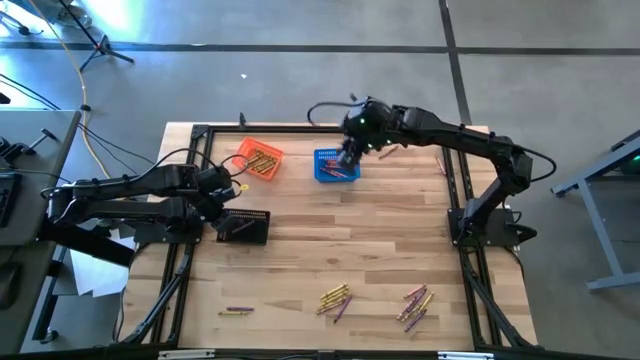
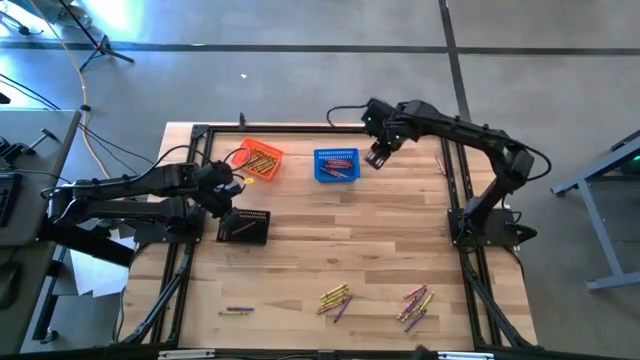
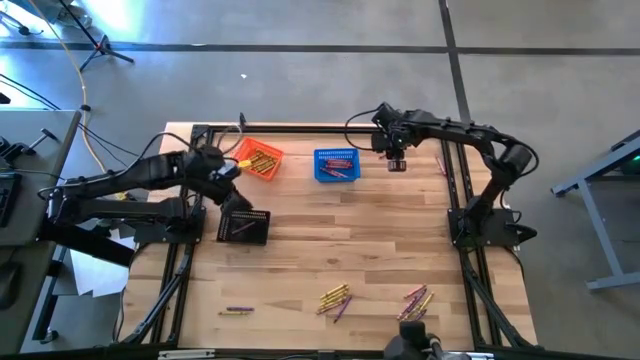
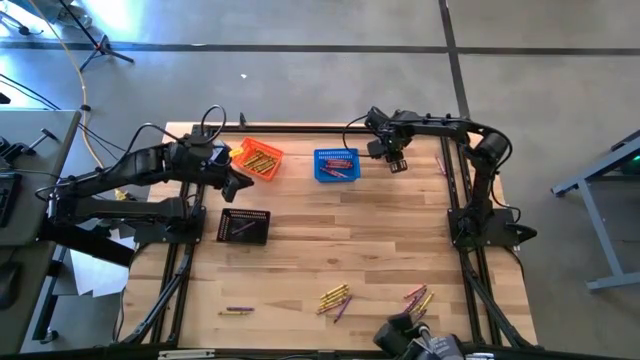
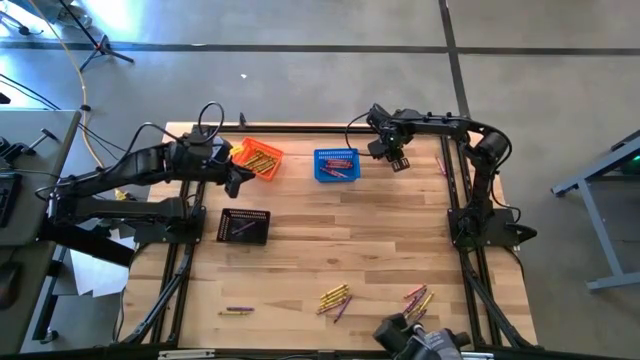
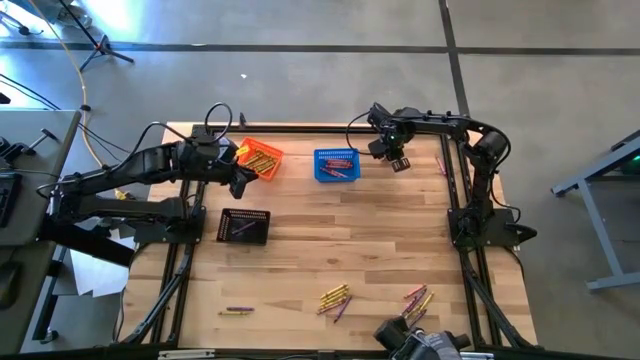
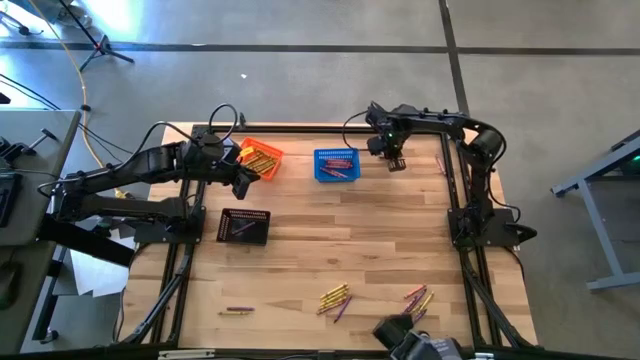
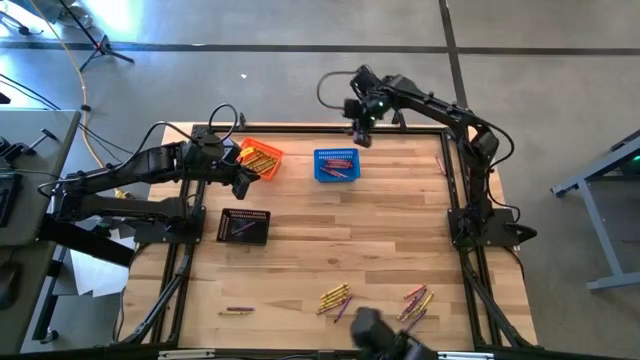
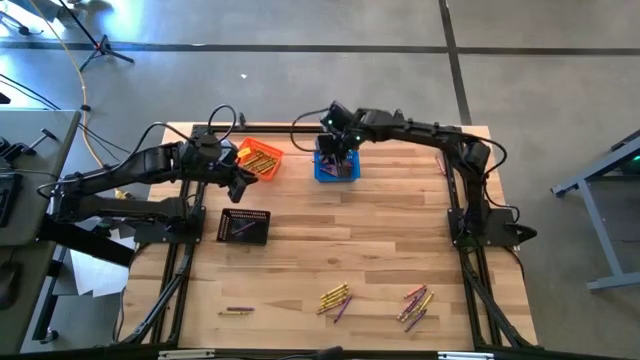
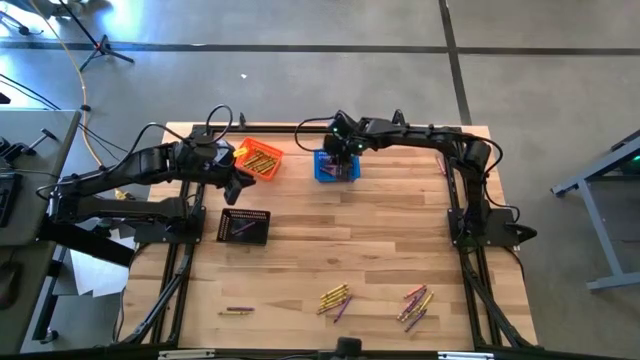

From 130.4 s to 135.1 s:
Task: Sort crayons
Put the red crayon into the blue bin

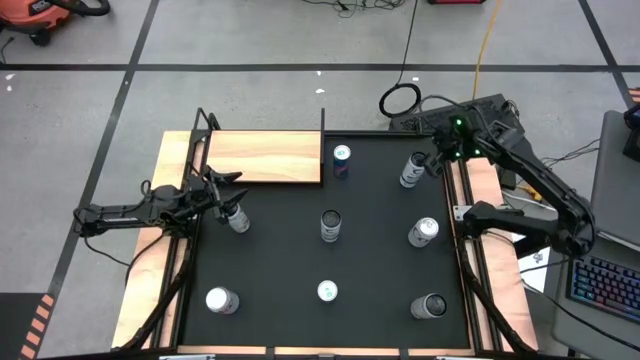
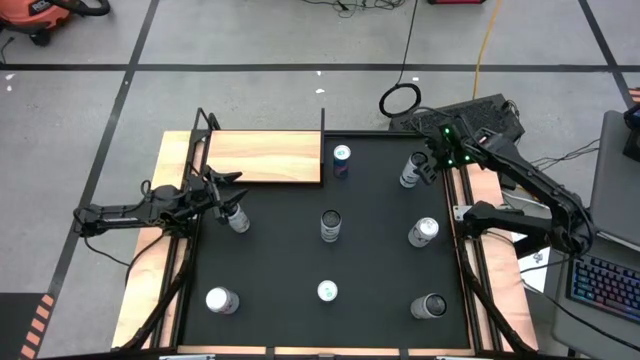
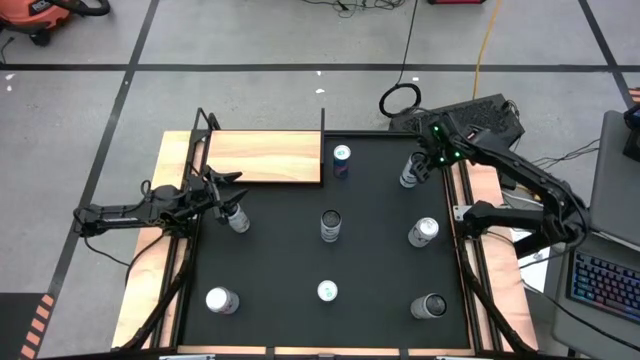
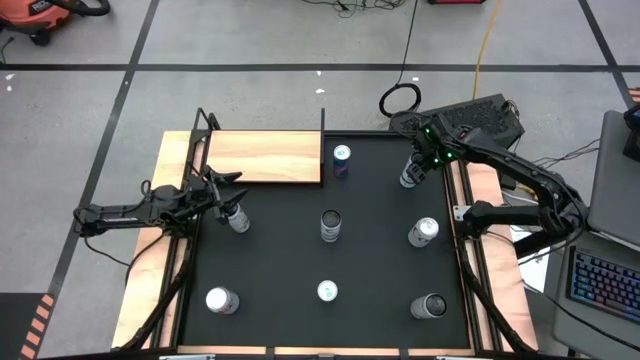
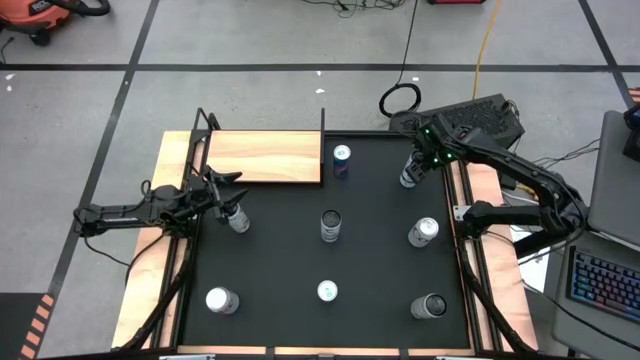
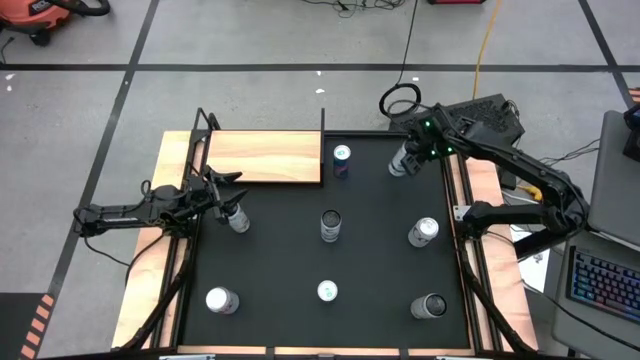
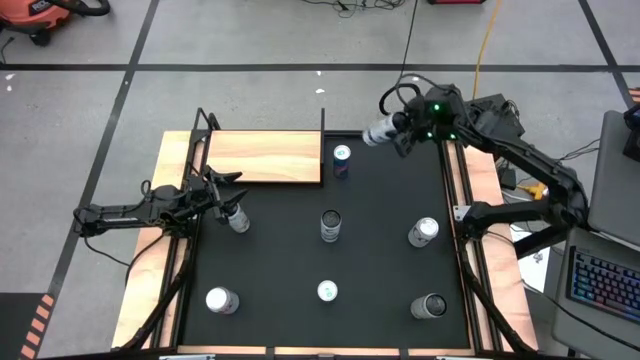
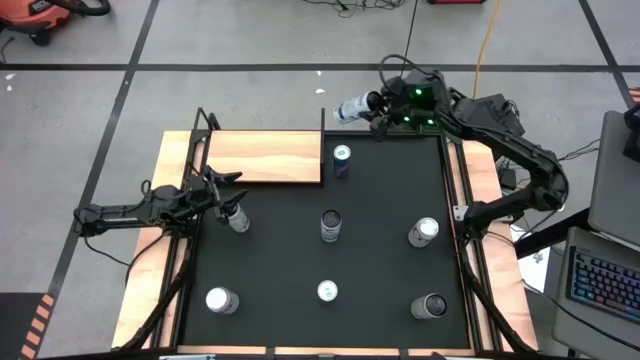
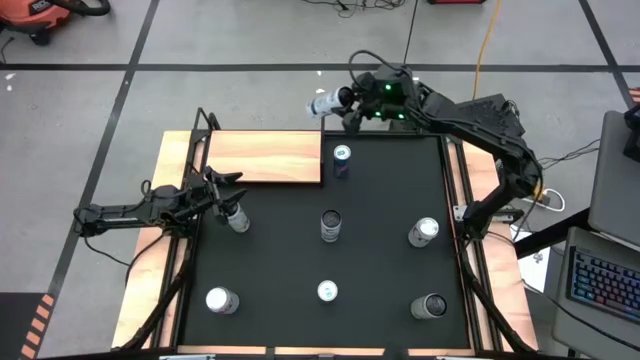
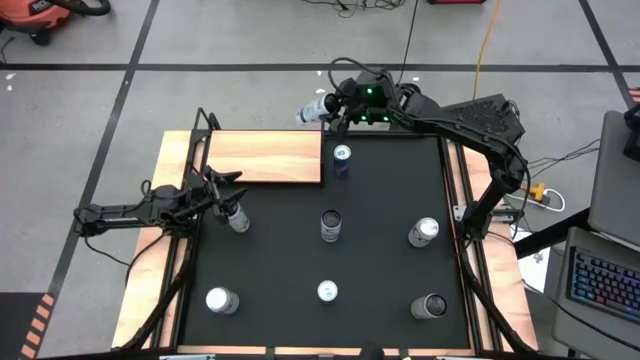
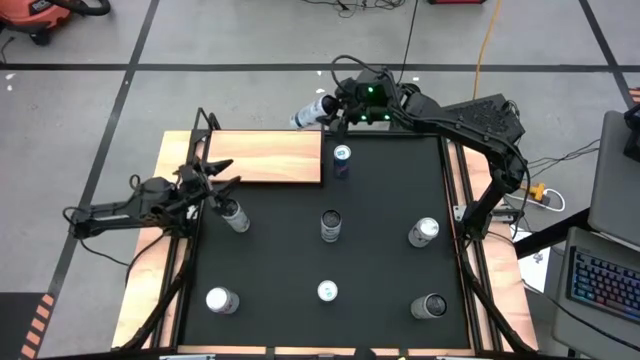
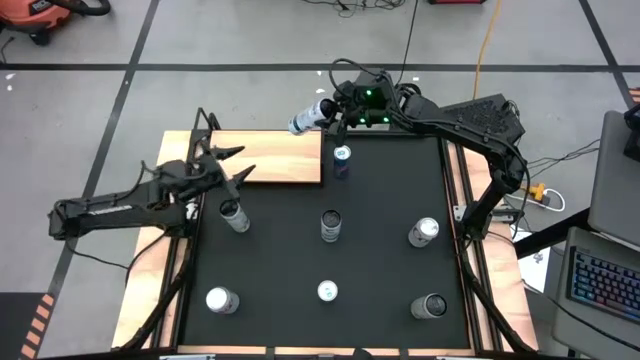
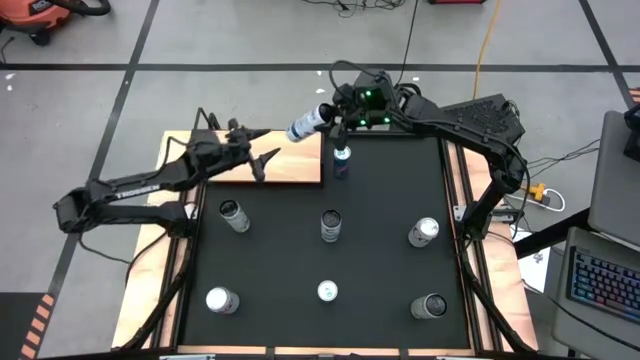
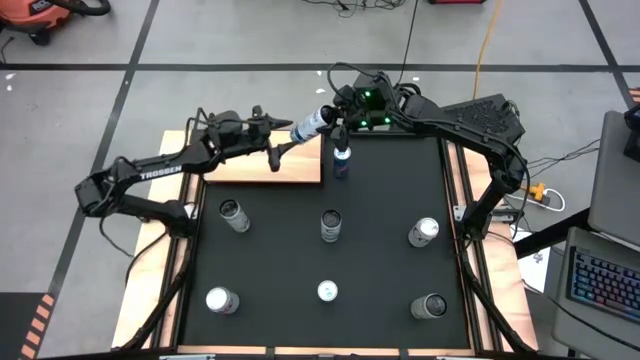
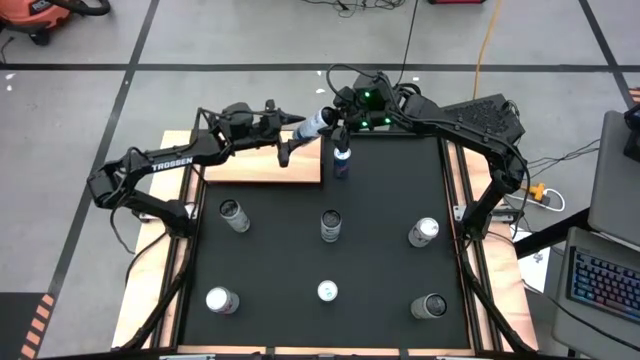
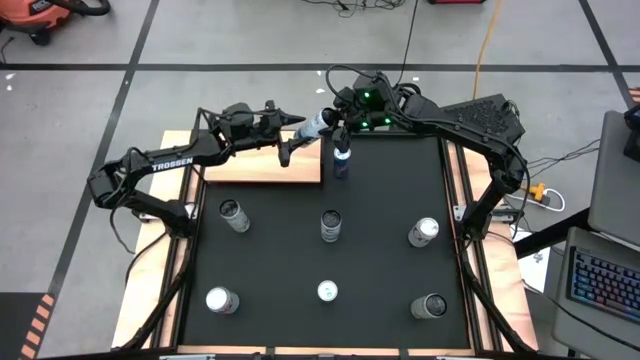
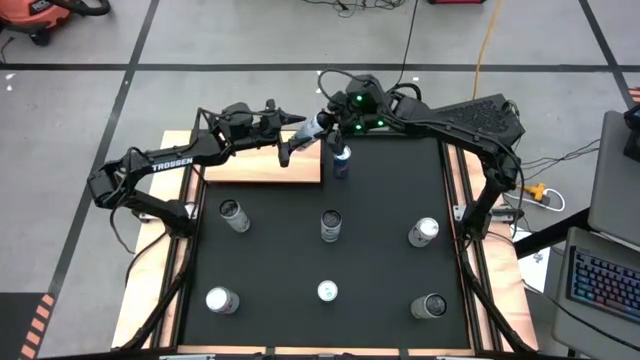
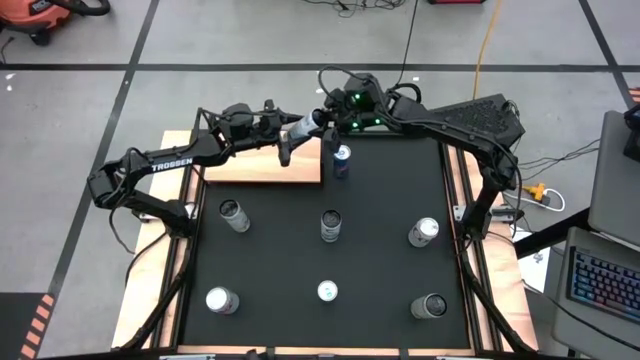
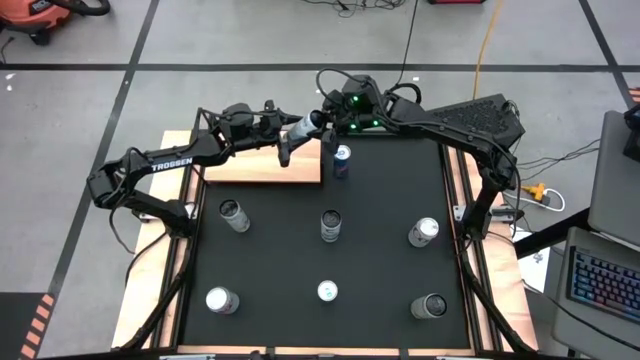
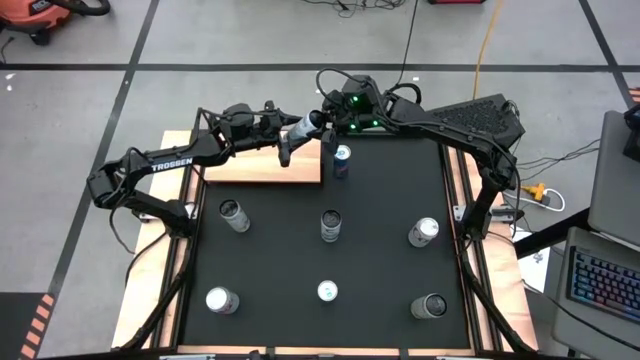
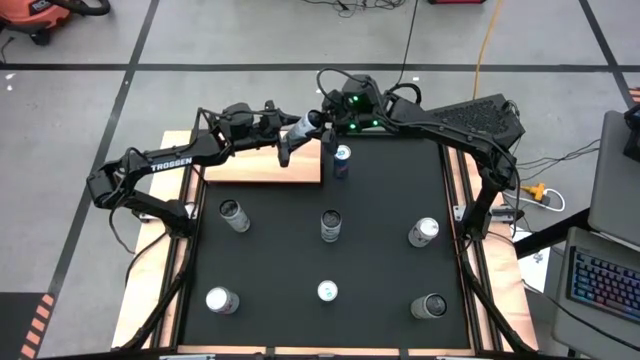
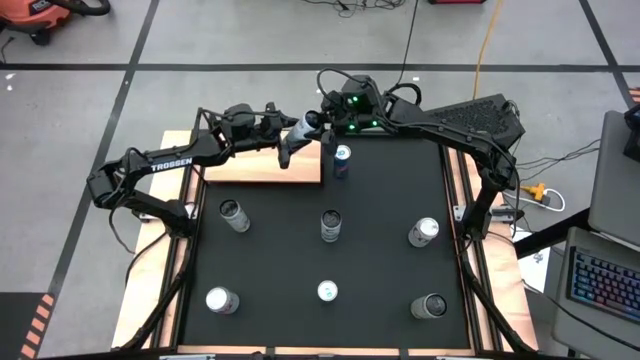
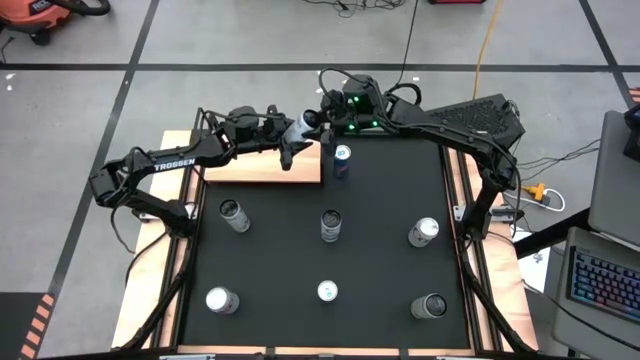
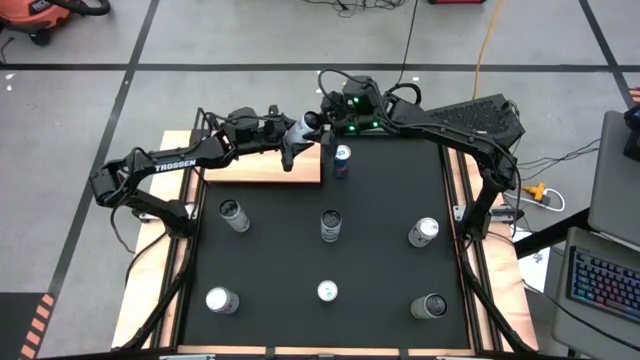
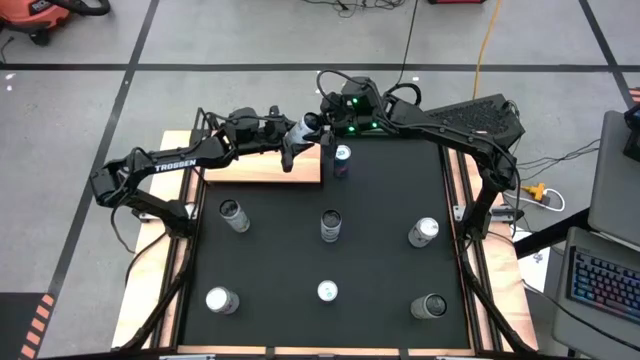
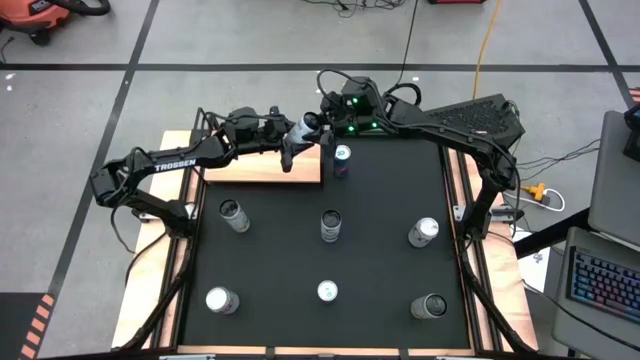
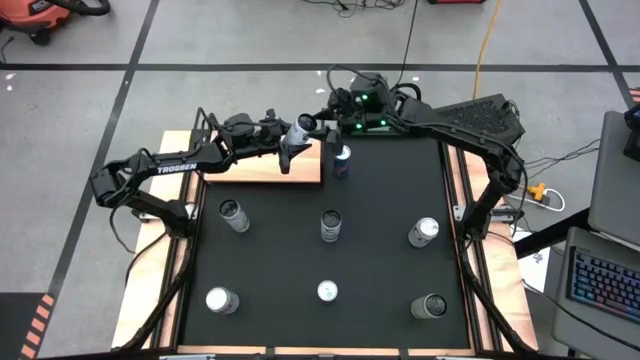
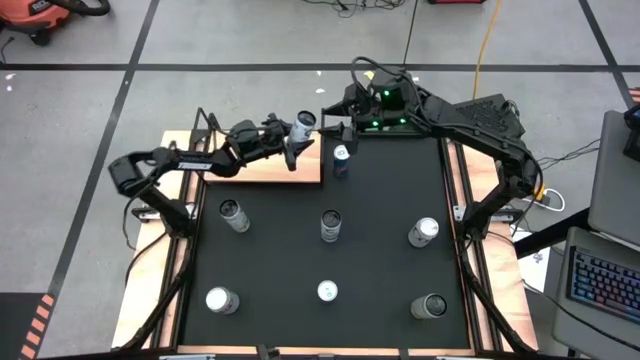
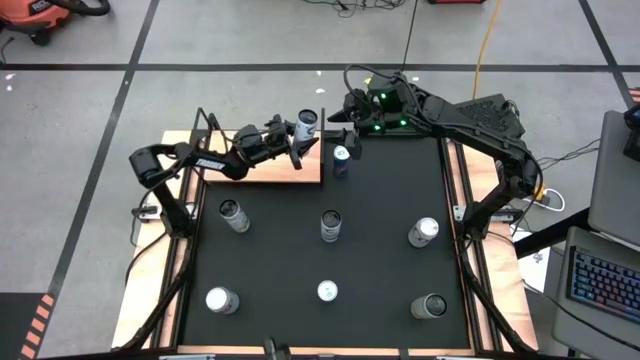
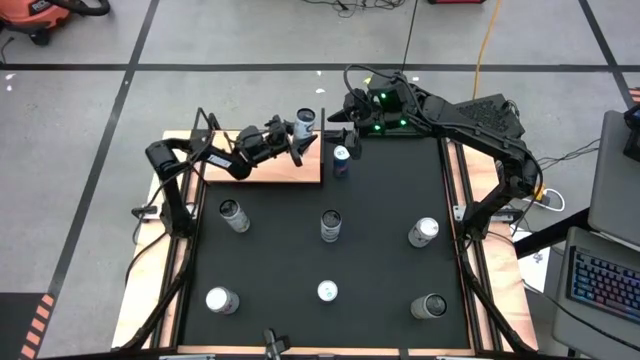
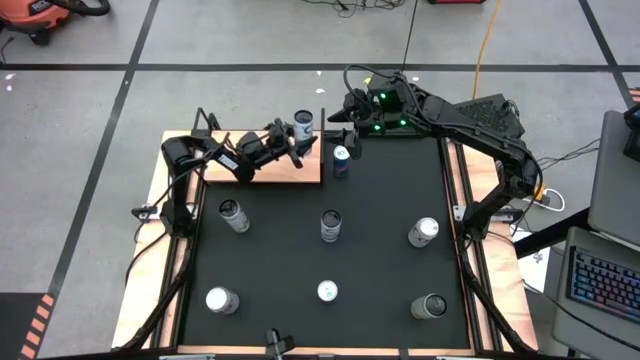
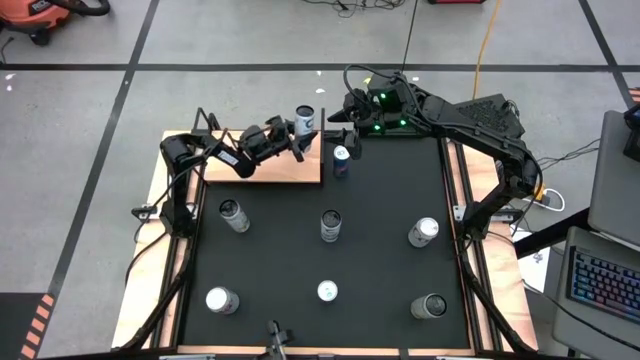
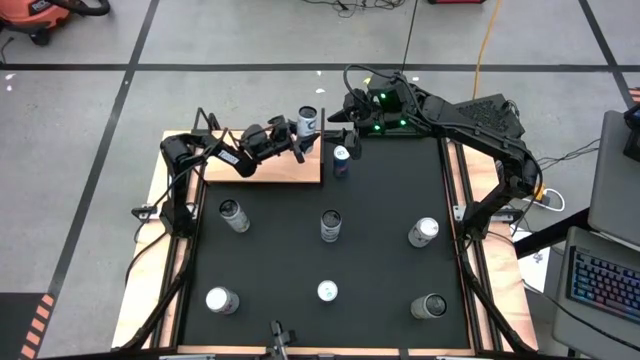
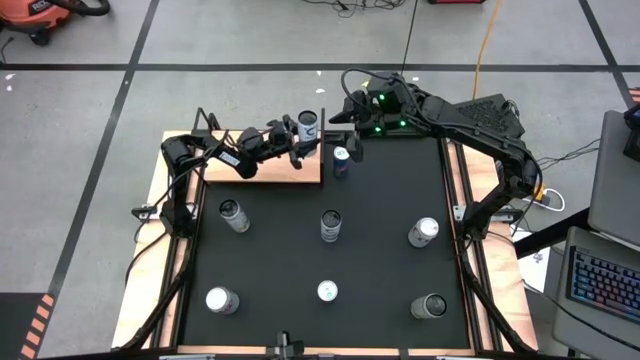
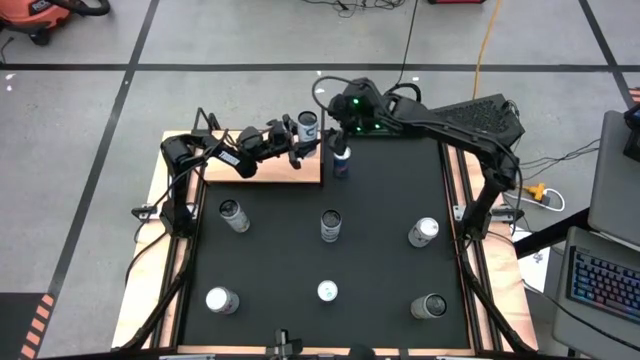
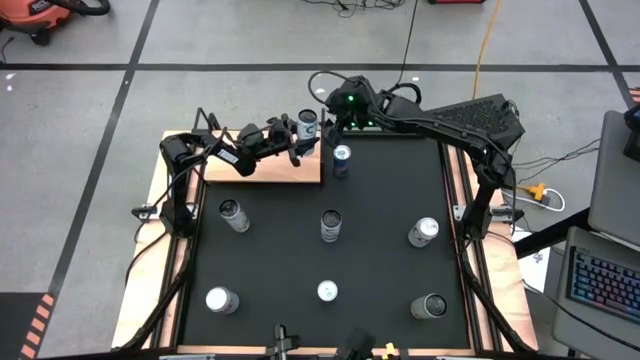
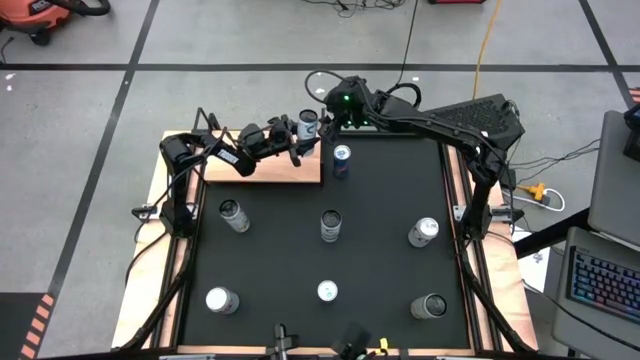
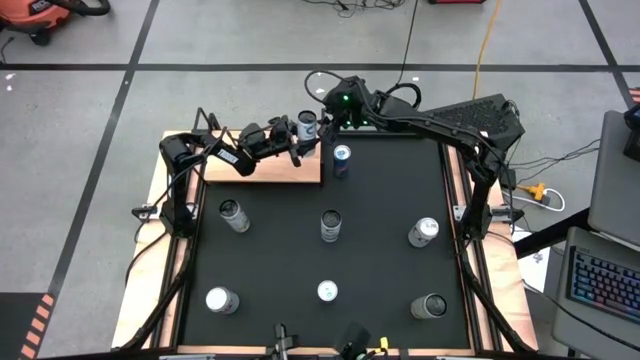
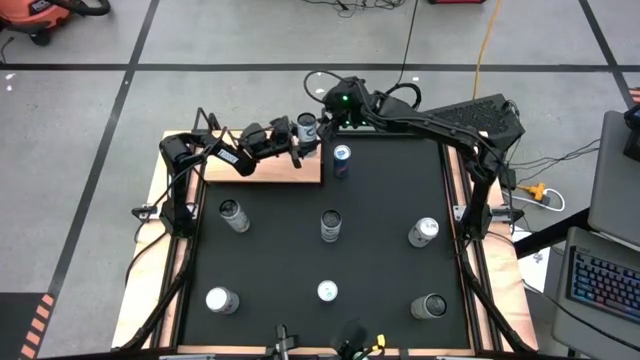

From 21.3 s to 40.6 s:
Task: Place canned beverage on shelf
Put the top white-blue soda can on the shelf
